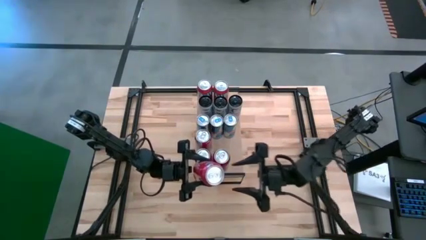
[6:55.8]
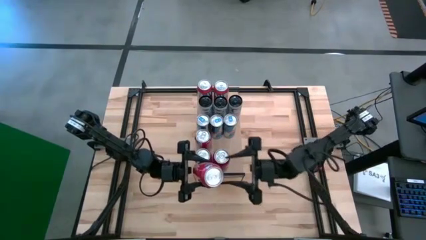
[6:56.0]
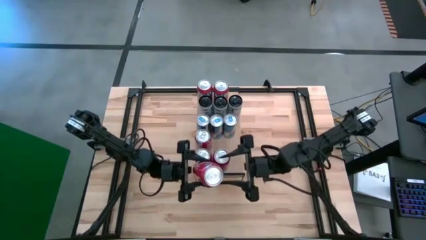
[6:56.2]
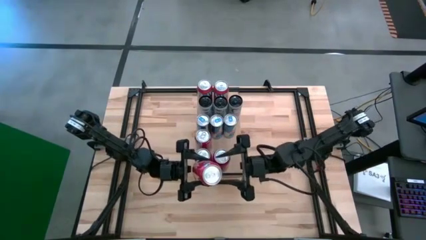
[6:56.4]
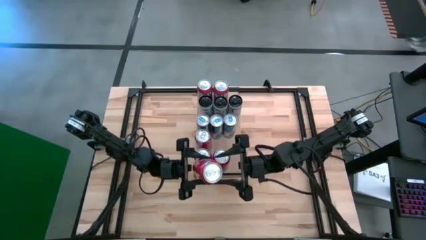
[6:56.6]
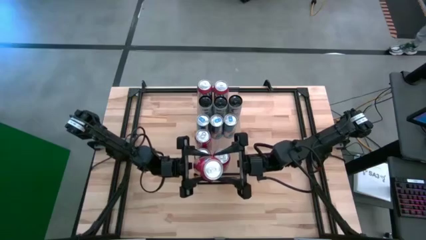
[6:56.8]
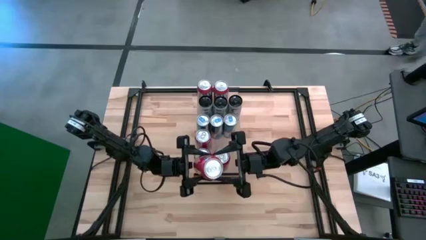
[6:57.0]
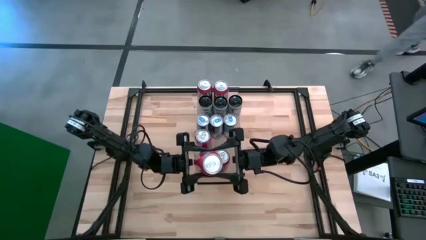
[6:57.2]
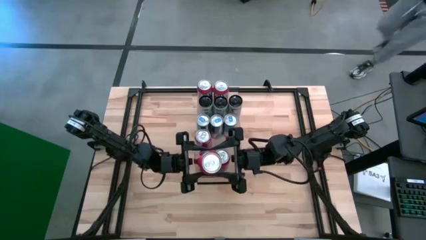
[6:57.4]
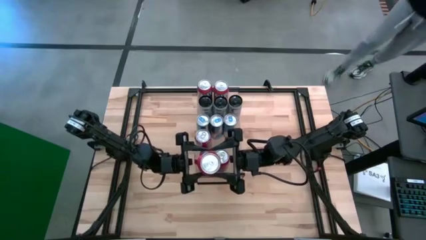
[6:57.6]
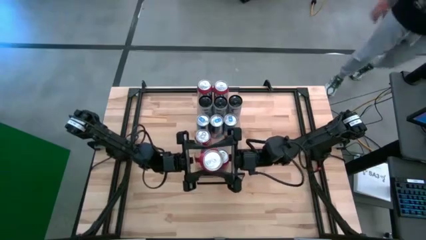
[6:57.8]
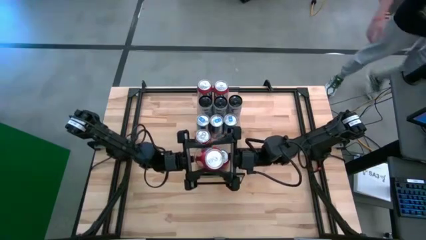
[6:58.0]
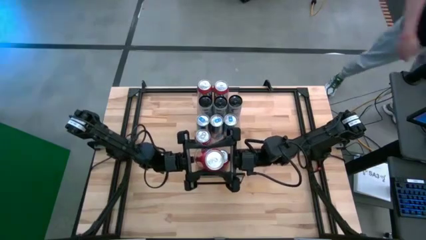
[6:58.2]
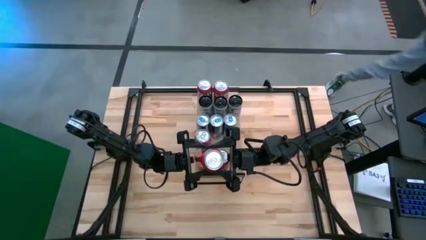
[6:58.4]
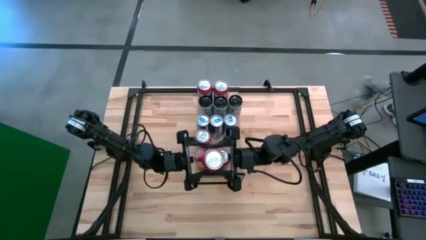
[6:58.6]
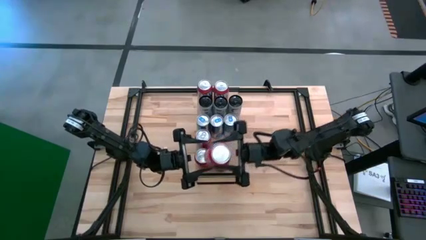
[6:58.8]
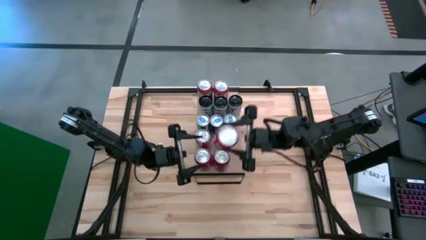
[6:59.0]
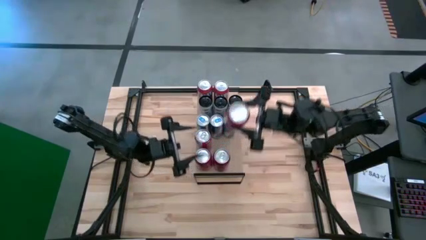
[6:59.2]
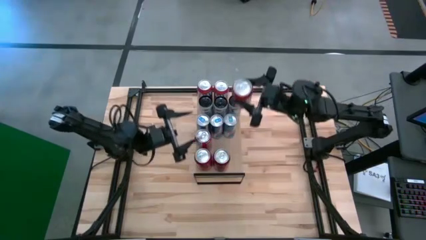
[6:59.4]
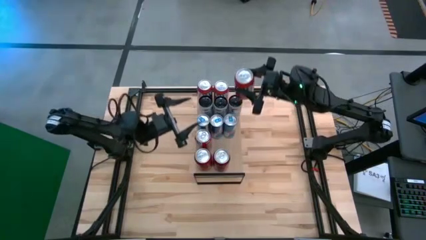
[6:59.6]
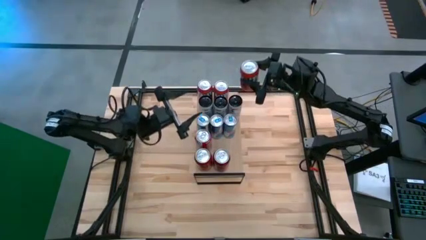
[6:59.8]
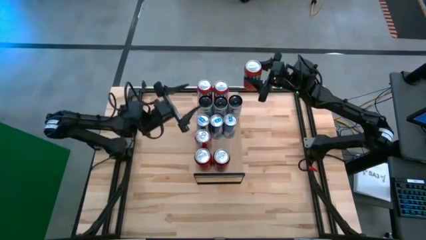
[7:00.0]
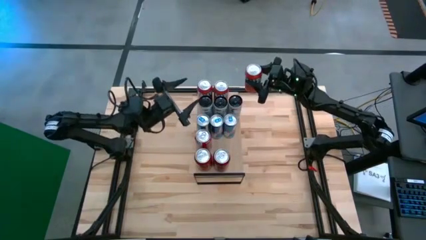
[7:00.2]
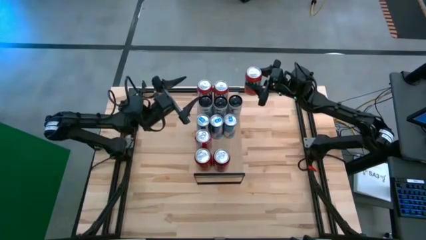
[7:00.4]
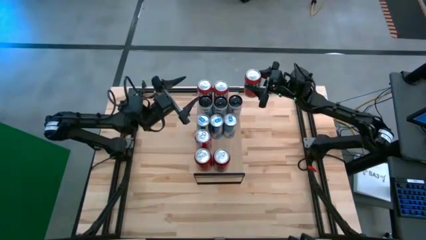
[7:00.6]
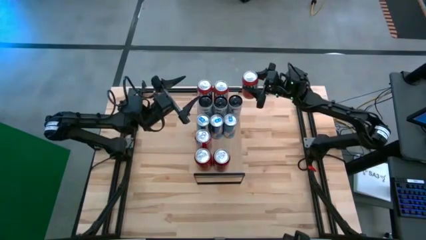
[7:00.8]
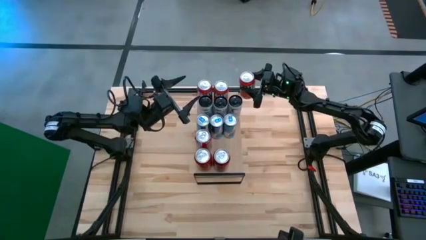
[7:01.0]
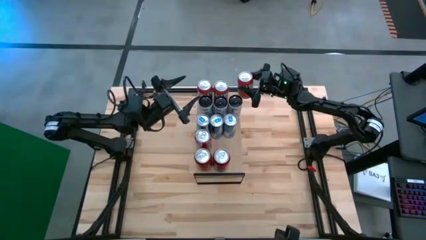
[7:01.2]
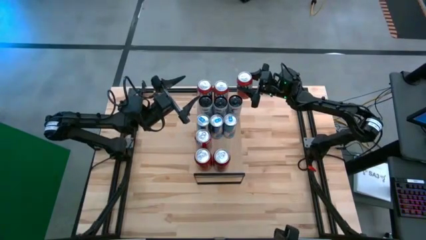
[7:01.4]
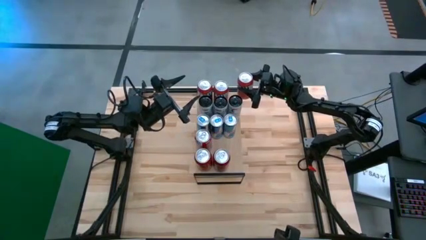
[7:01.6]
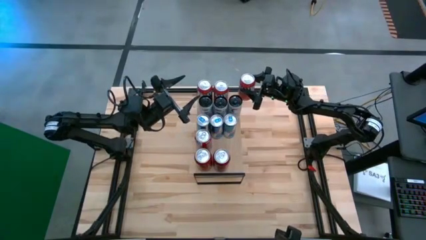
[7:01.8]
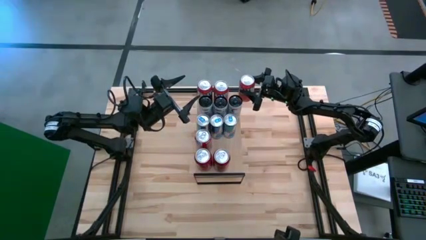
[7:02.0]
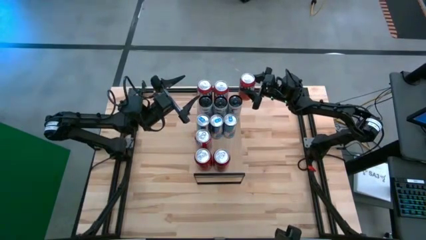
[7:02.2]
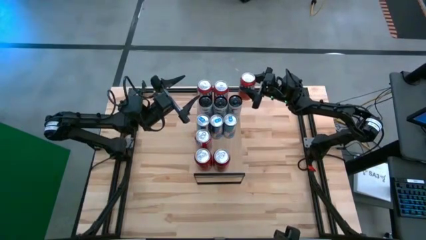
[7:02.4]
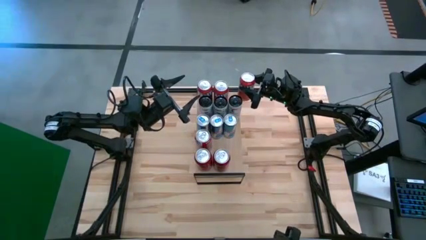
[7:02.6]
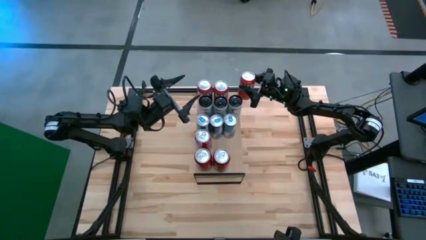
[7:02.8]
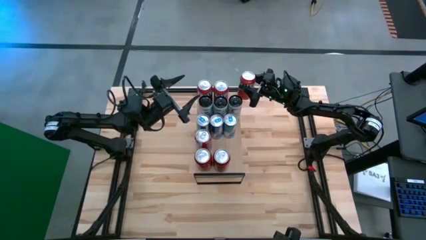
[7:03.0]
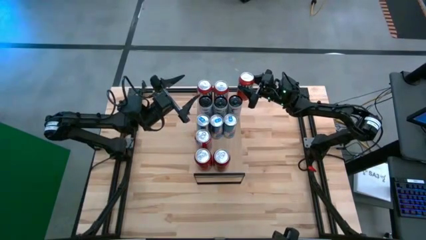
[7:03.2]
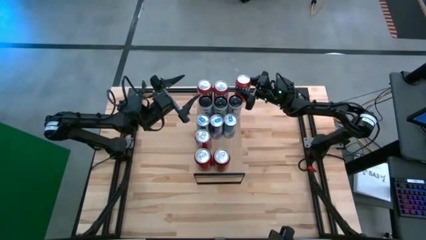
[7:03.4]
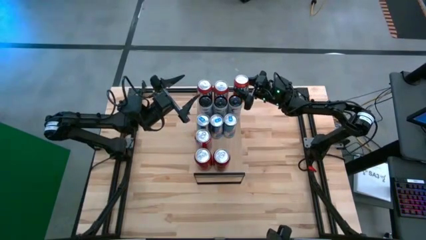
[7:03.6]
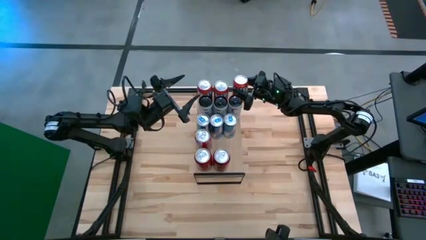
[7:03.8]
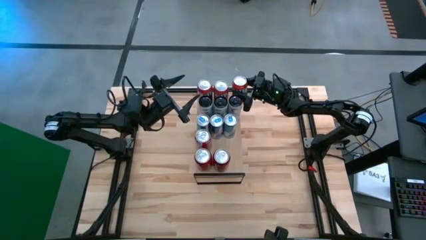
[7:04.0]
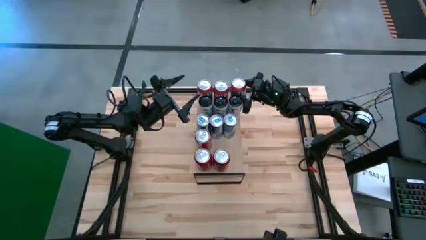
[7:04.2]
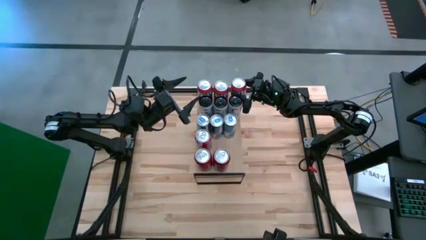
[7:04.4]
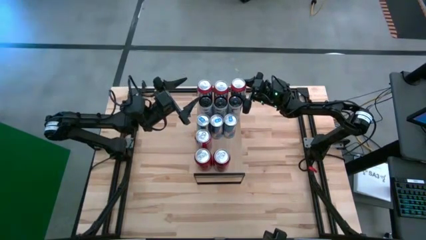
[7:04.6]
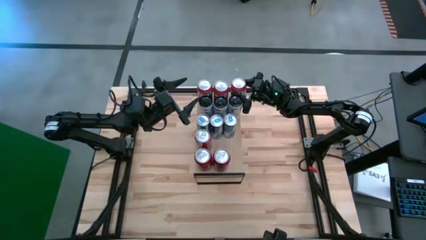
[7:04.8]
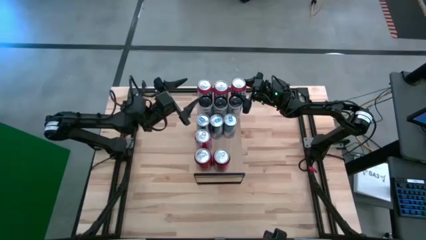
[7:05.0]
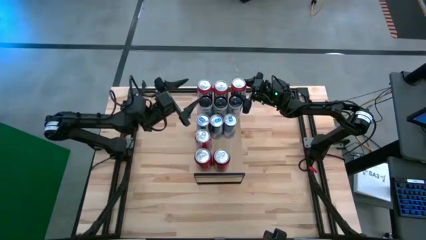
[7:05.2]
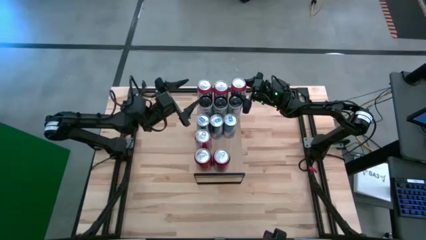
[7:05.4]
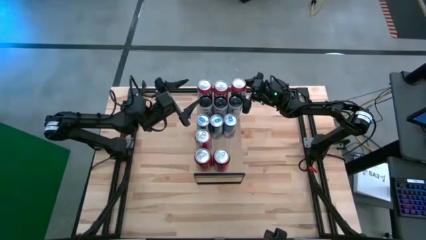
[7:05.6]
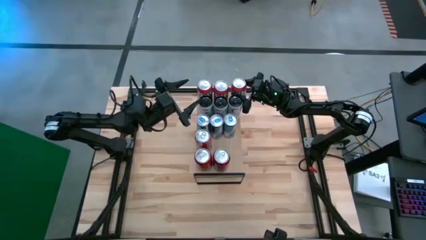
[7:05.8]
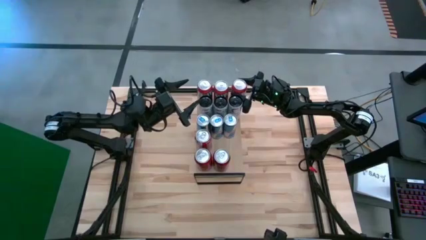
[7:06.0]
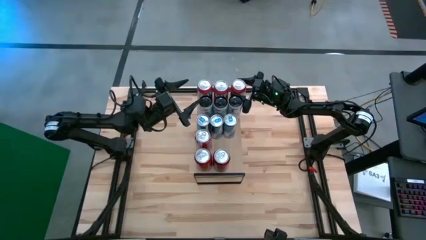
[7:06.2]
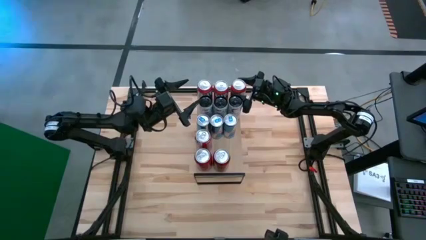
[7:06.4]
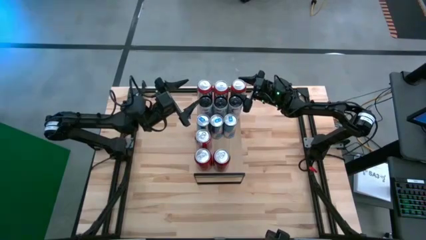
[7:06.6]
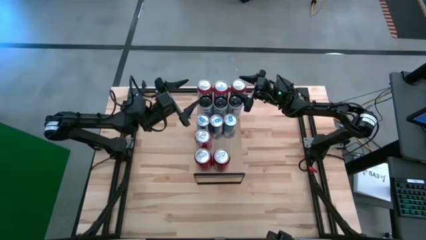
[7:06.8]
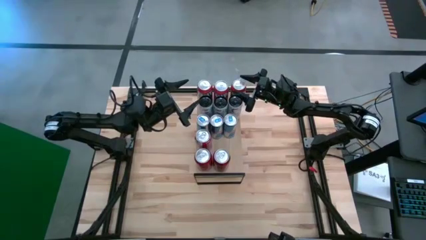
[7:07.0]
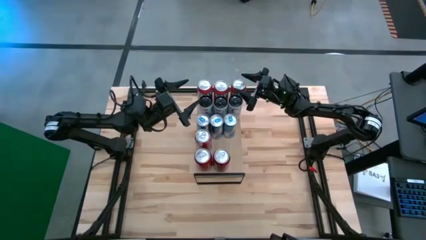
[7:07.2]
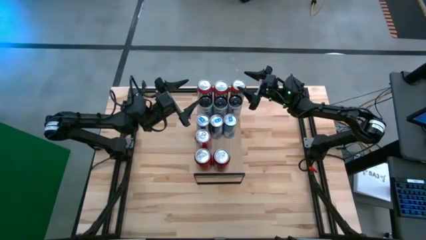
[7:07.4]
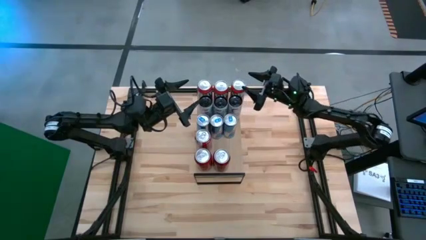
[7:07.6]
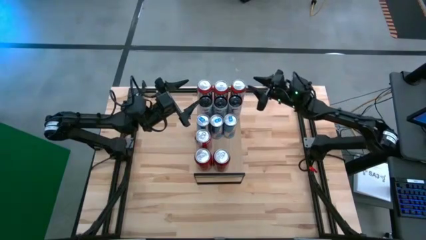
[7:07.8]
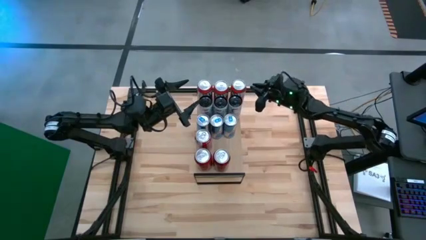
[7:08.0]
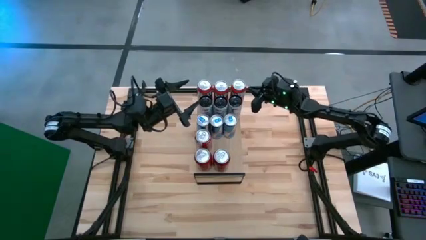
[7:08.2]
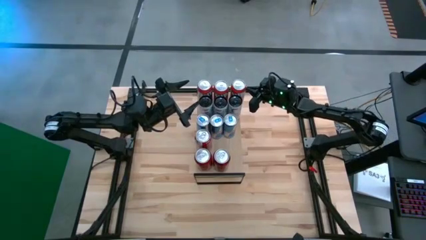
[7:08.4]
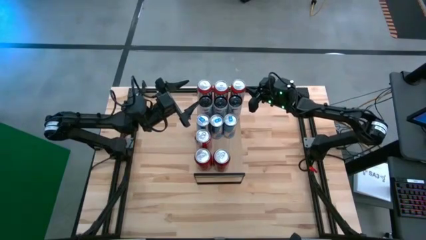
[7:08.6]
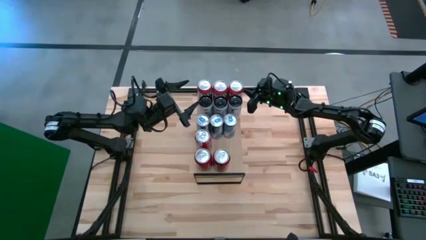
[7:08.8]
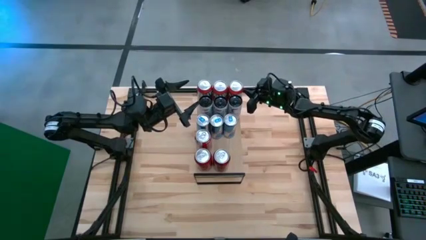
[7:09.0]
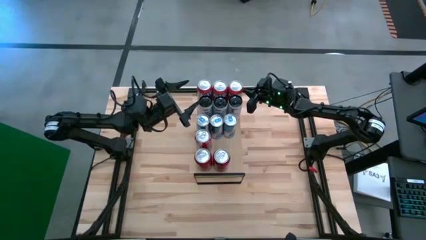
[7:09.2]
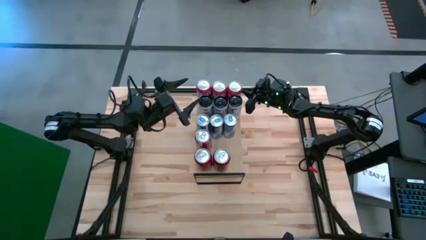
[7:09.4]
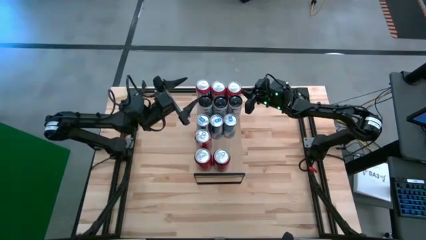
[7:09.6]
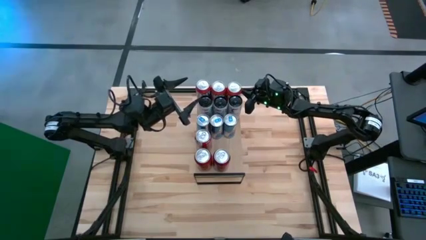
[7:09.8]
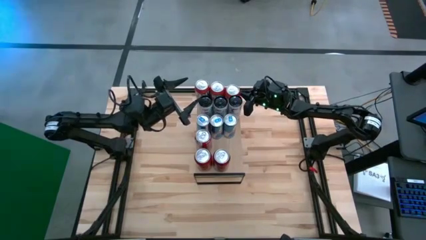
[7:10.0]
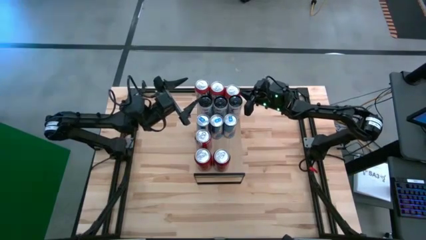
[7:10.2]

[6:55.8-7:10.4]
Task: Place canned beverage on shelf
Put the orange soda can on the shelf aligned with the other orange soda cans
